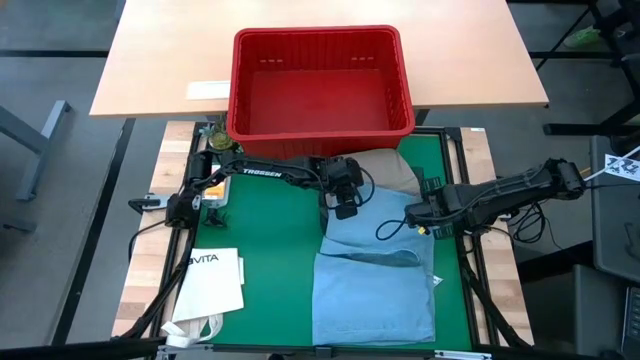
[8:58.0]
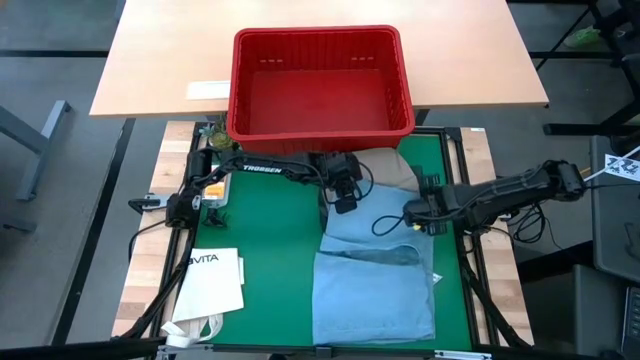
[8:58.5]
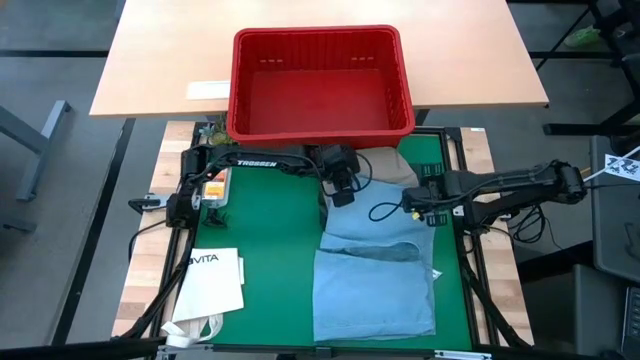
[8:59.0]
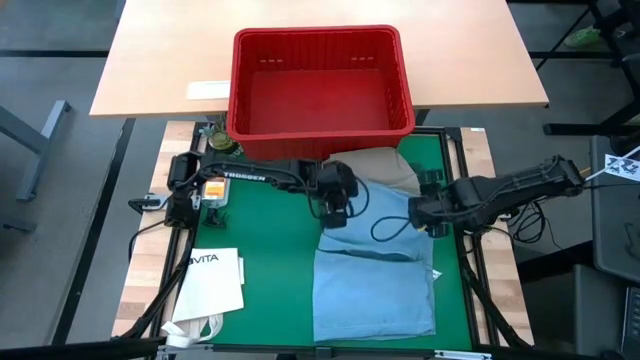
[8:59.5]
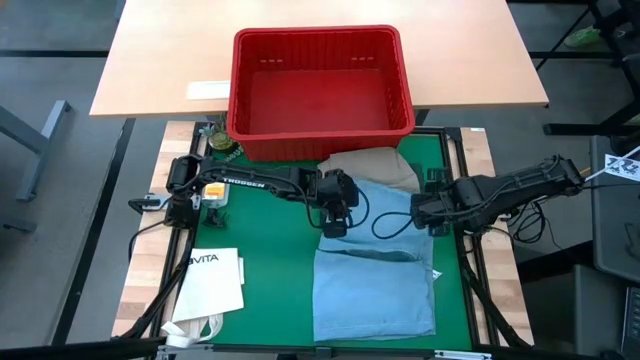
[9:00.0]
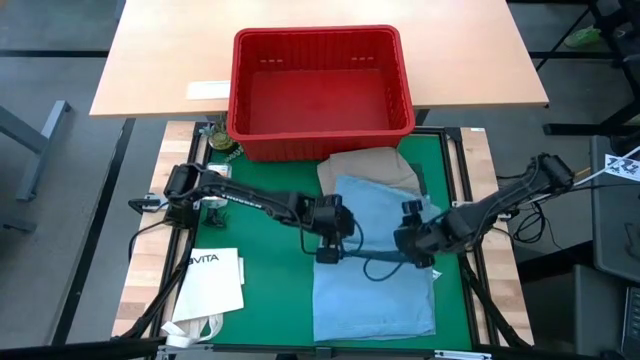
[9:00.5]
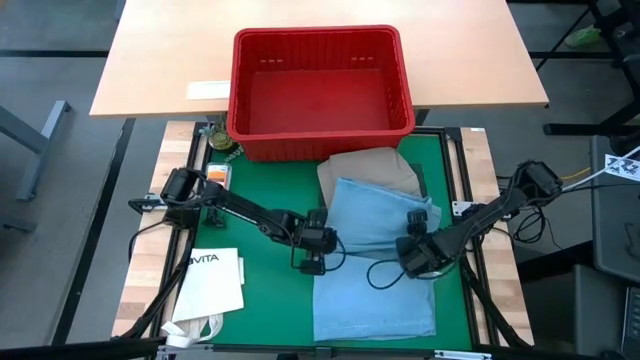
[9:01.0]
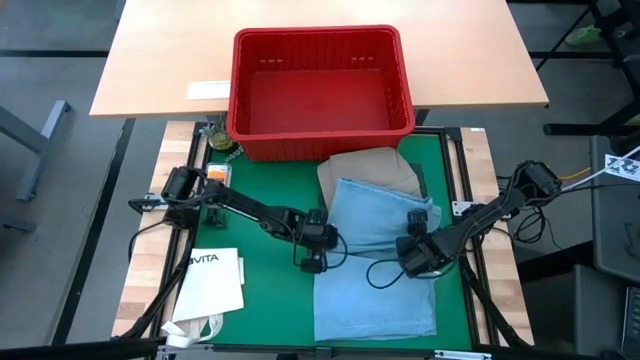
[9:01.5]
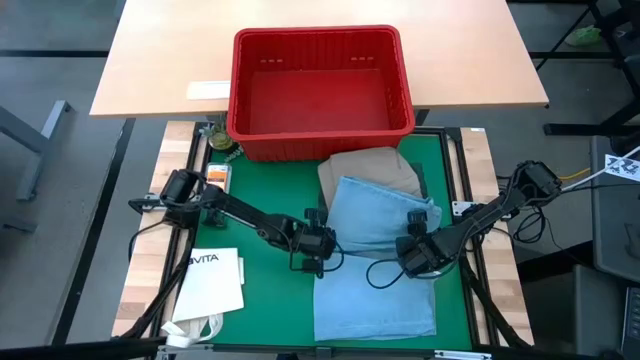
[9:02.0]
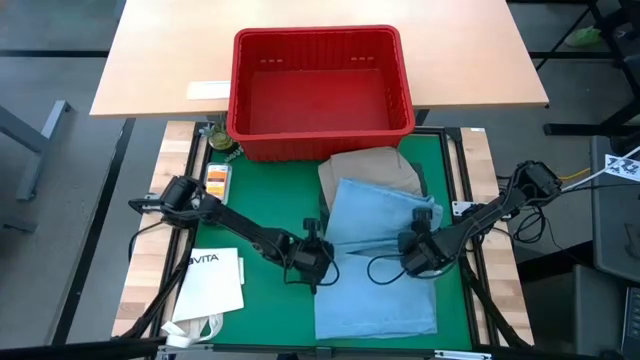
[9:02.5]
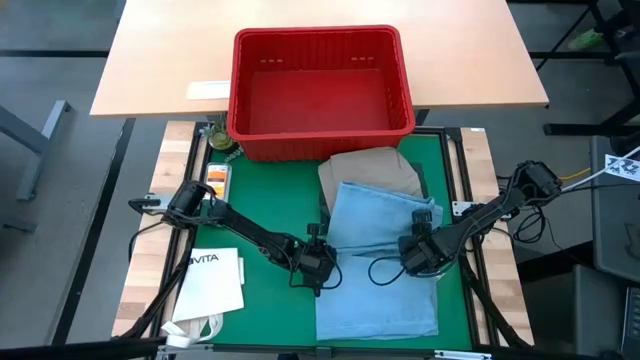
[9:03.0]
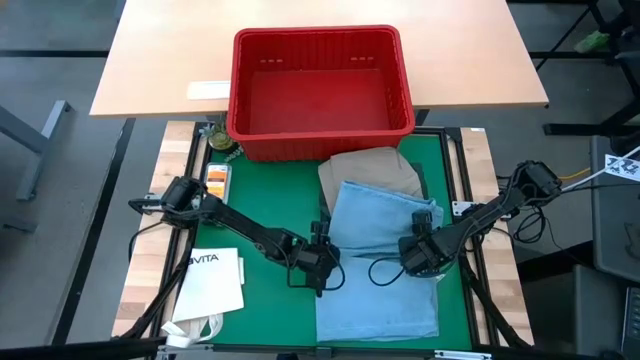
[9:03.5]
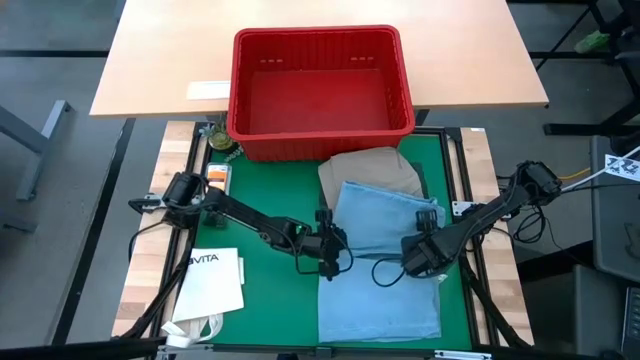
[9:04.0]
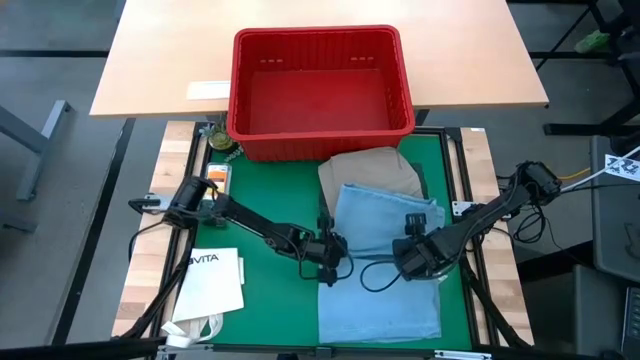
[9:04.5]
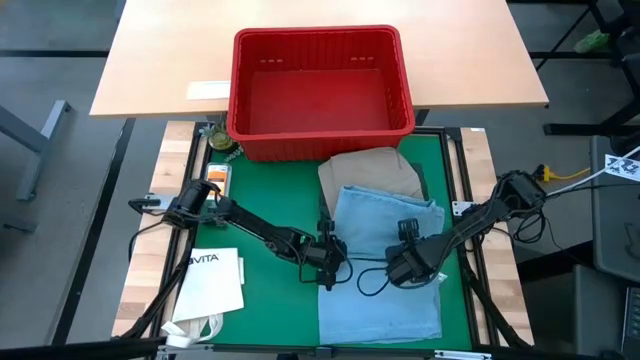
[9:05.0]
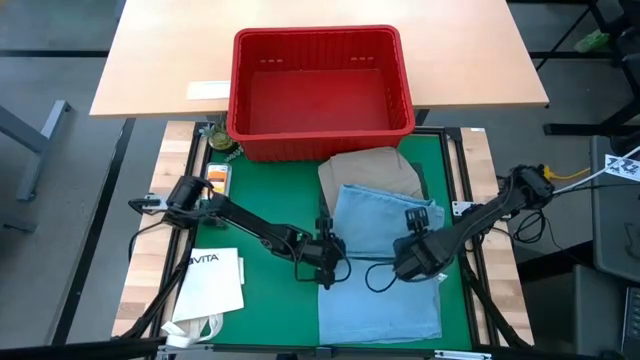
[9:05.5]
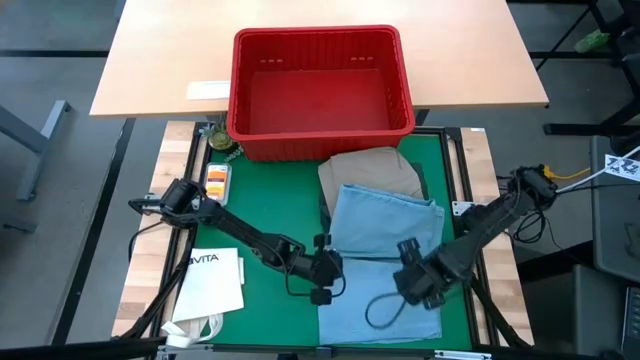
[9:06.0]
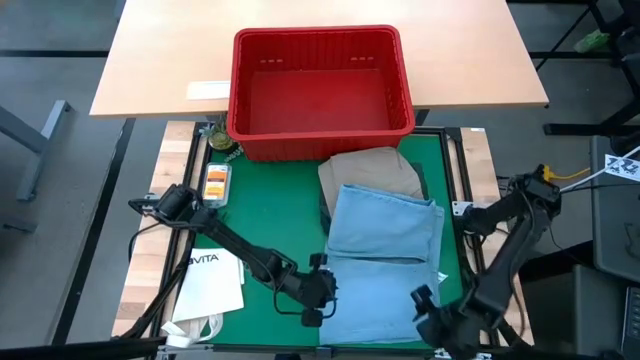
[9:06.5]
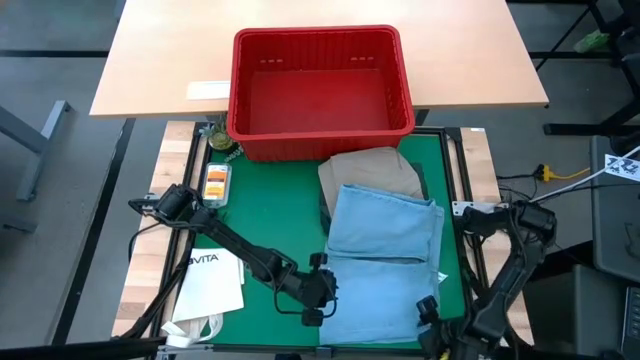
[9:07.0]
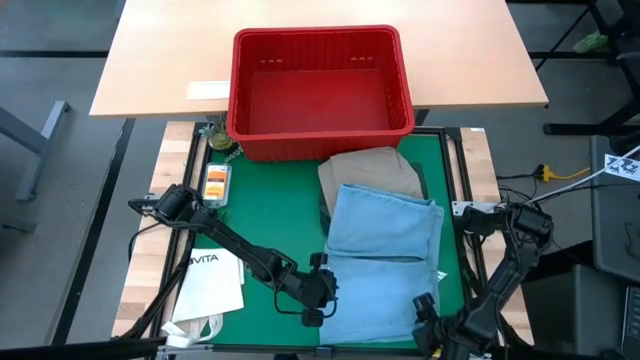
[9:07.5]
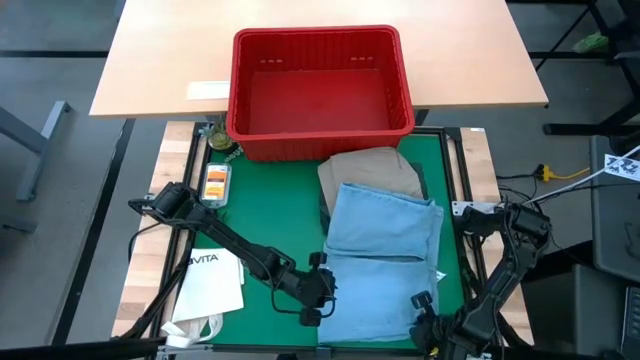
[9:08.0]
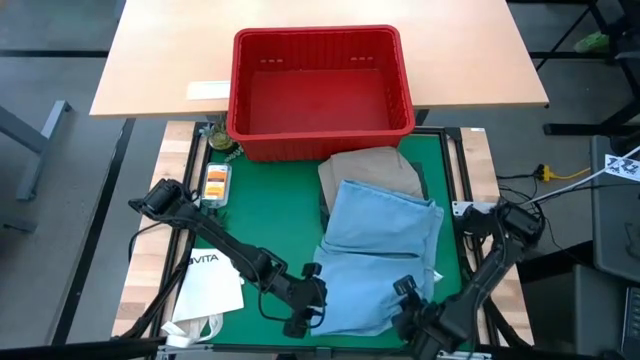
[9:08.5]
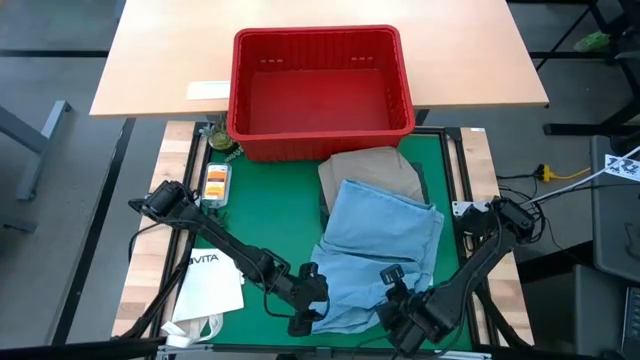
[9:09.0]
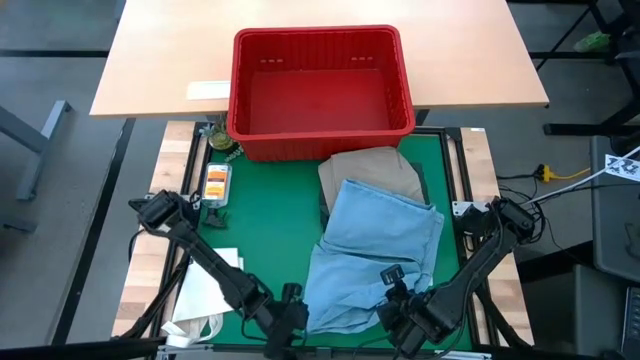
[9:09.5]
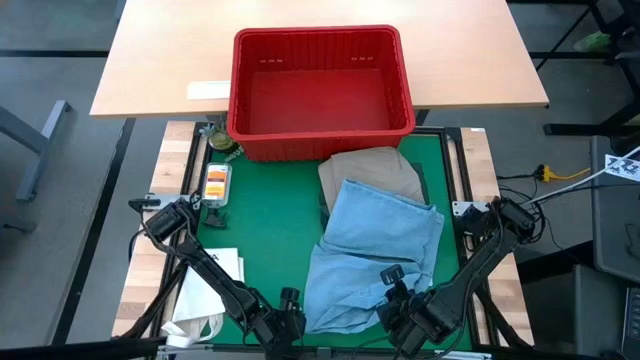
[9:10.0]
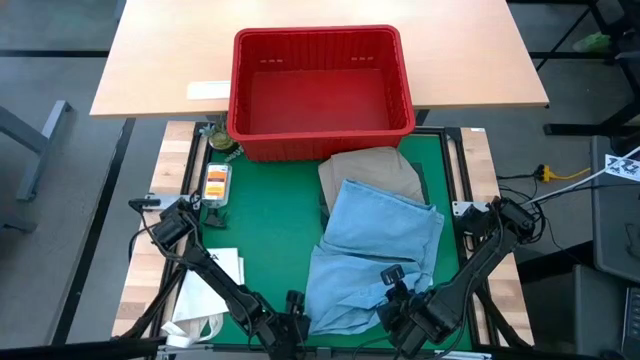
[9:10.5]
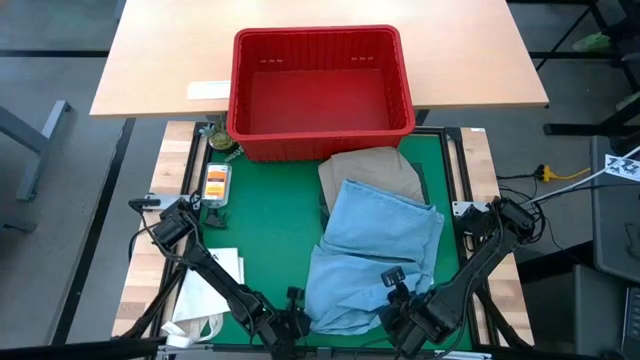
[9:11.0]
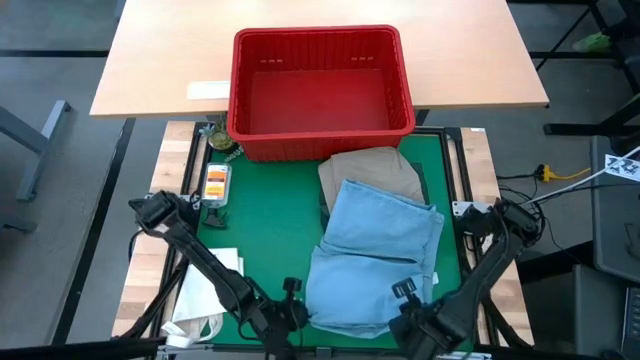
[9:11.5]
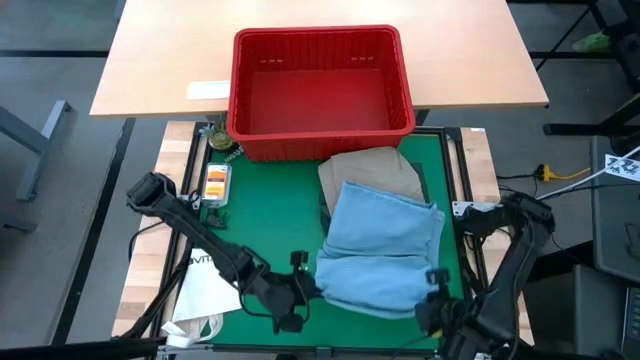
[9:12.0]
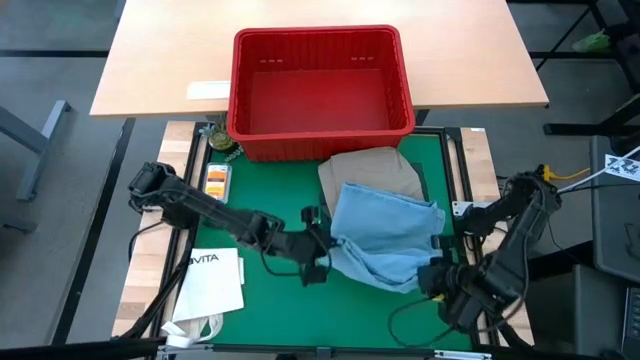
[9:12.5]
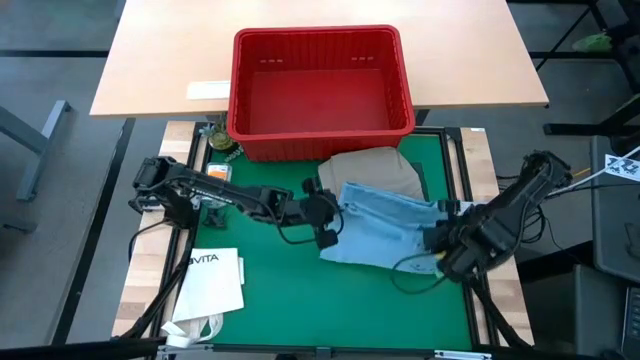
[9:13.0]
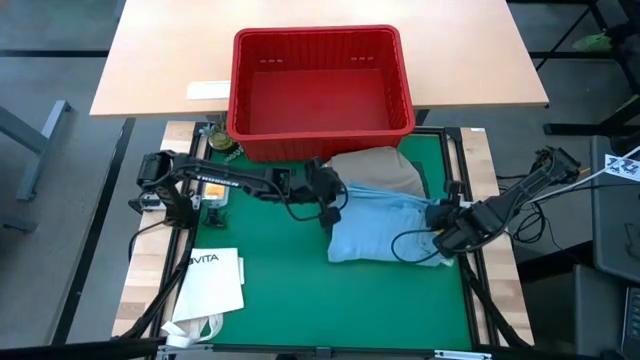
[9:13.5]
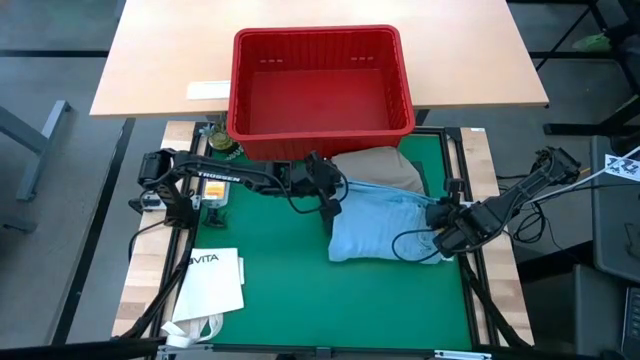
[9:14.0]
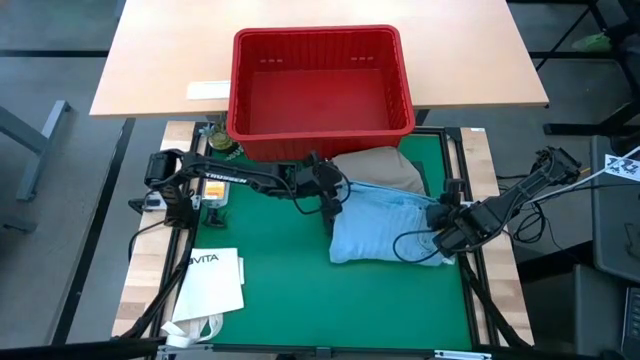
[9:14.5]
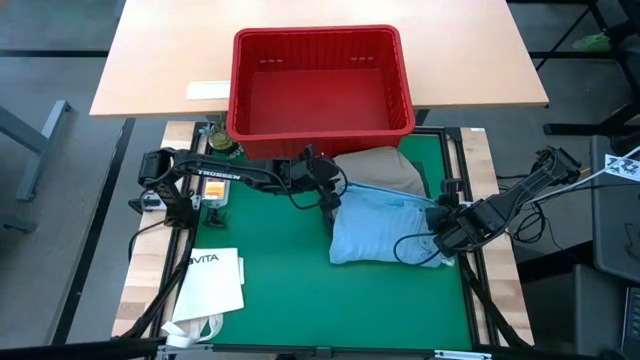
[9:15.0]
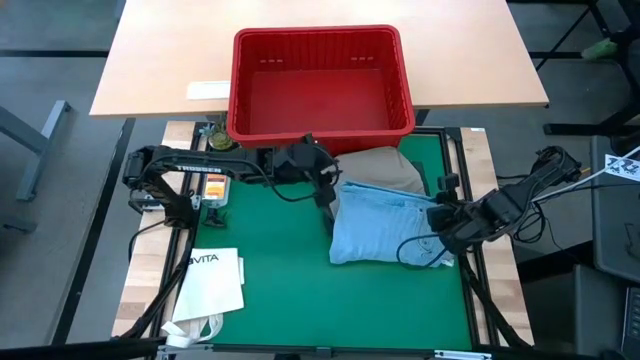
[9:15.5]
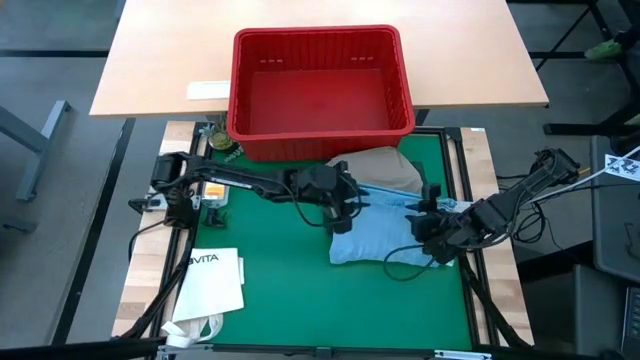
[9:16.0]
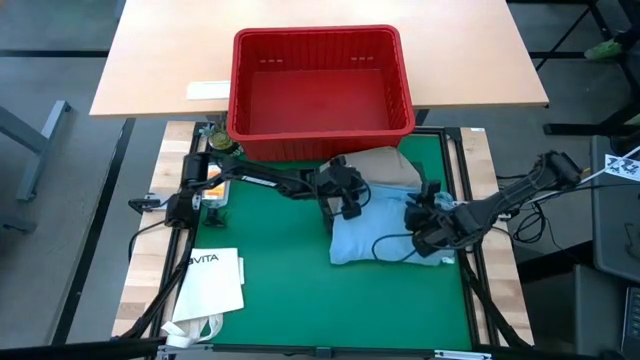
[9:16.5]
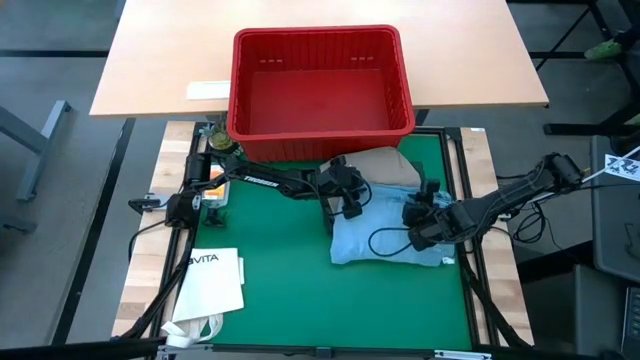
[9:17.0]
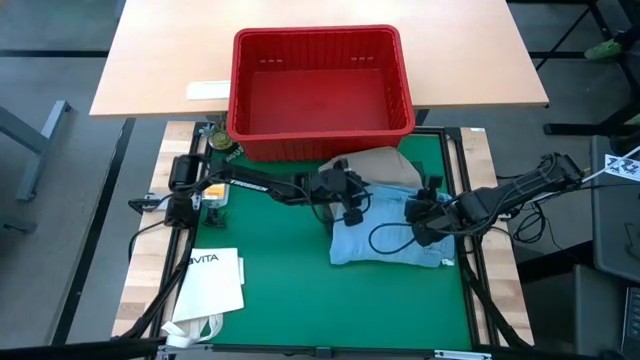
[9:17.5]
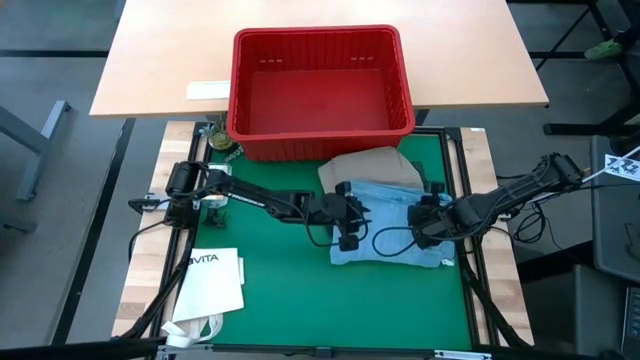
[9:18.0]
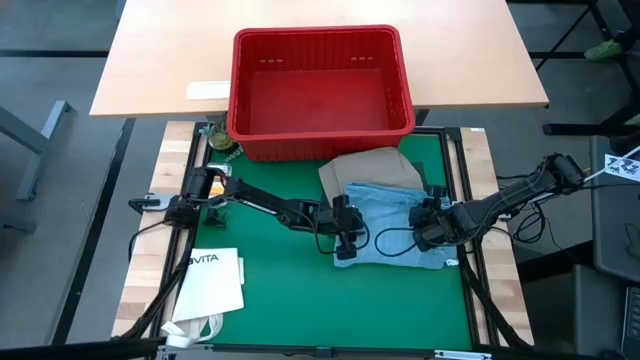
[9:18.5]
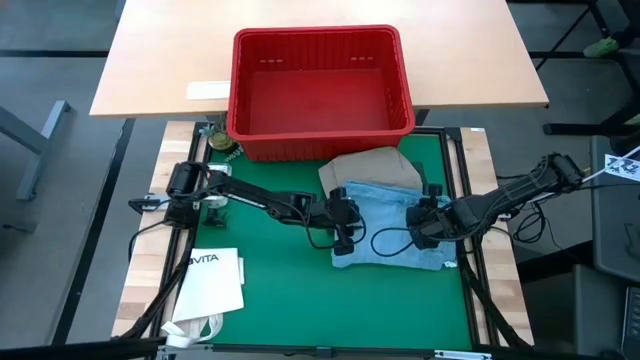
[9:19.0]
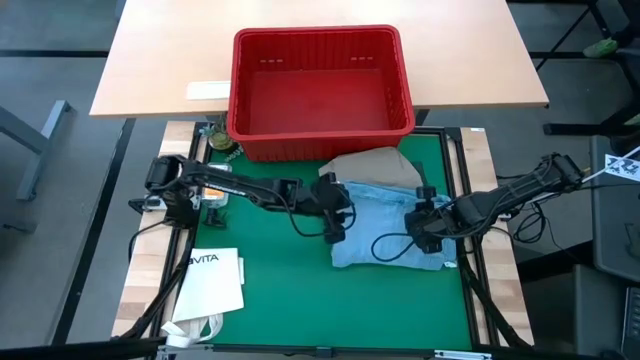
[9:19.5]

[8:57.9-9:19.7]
Task: Fold Laundry from Bin
Fold the light blue pants
